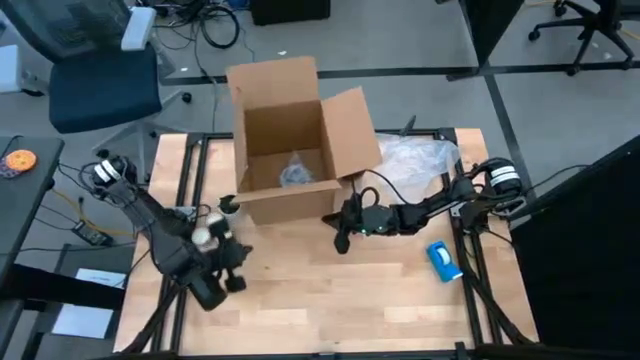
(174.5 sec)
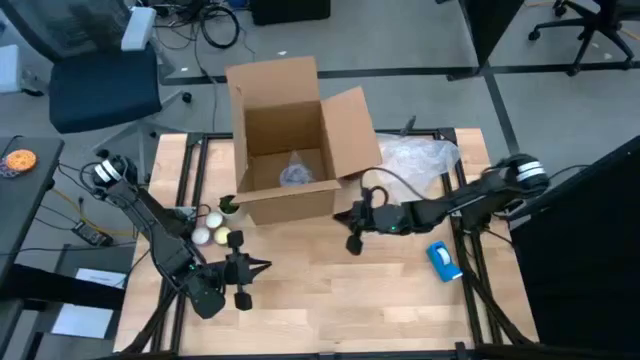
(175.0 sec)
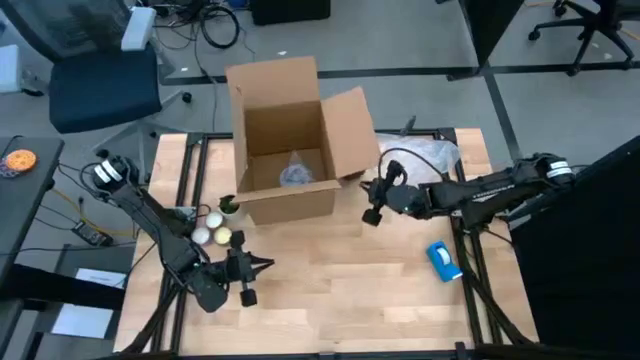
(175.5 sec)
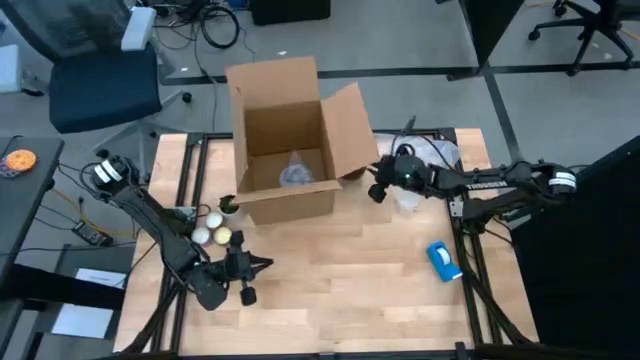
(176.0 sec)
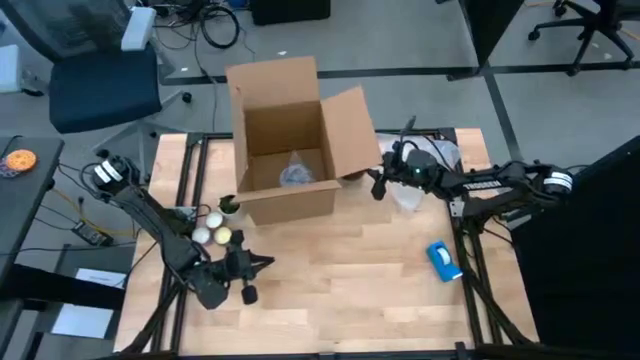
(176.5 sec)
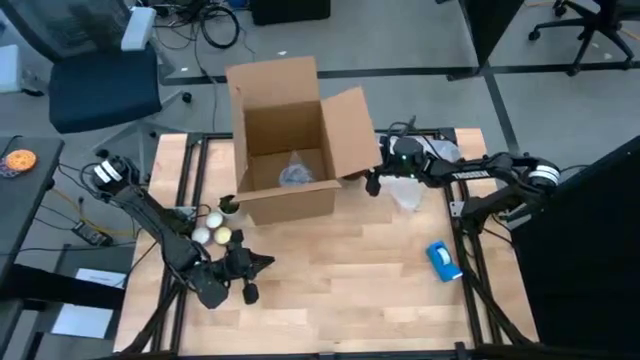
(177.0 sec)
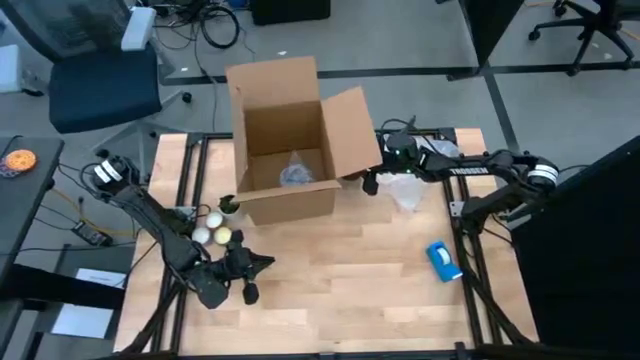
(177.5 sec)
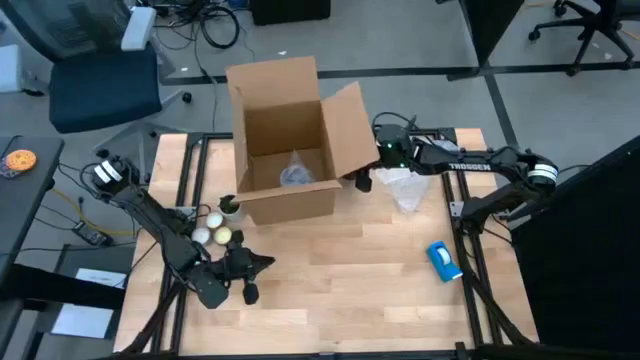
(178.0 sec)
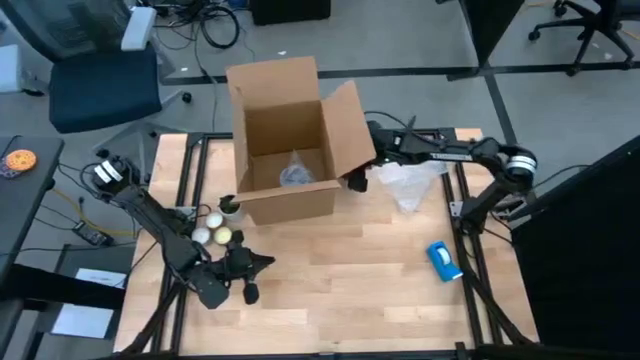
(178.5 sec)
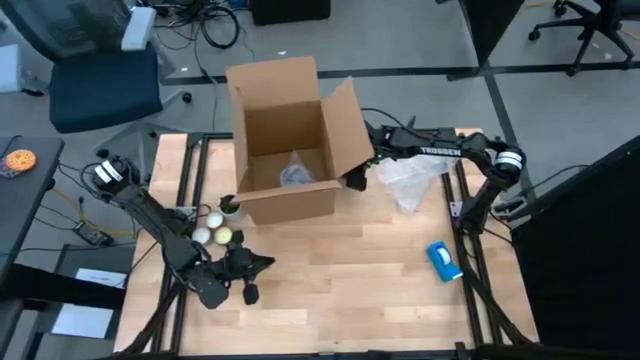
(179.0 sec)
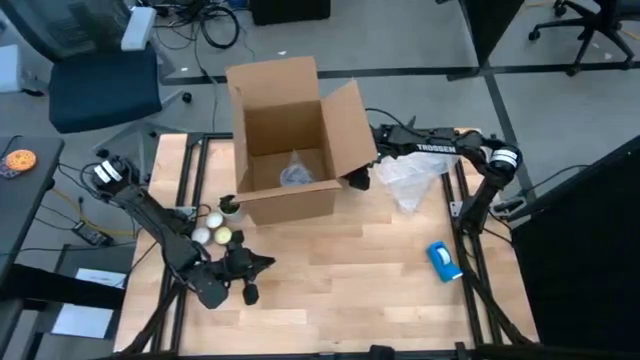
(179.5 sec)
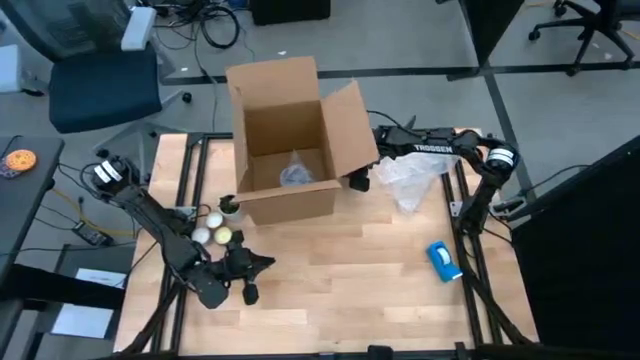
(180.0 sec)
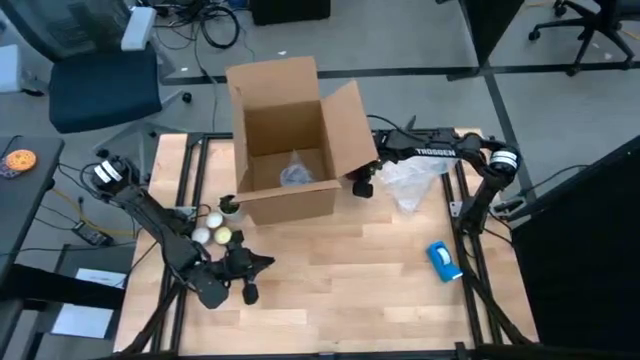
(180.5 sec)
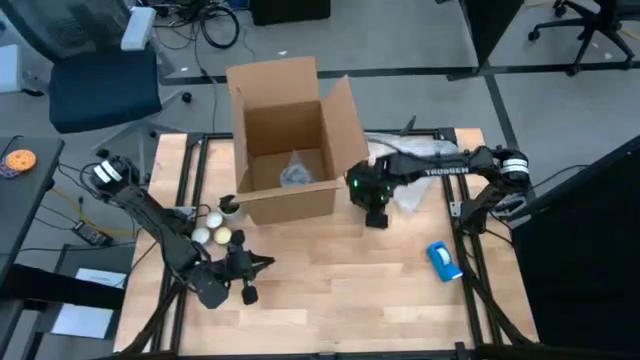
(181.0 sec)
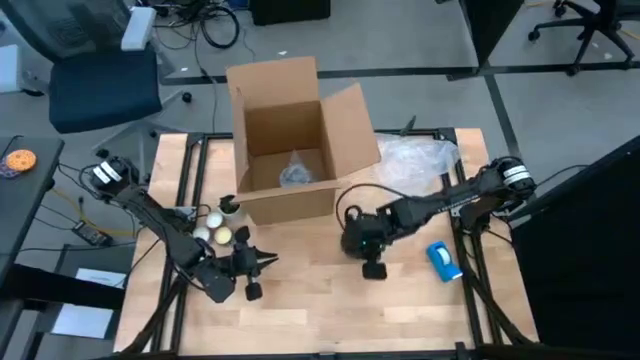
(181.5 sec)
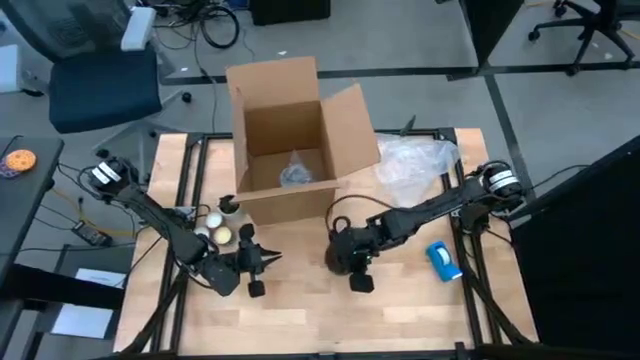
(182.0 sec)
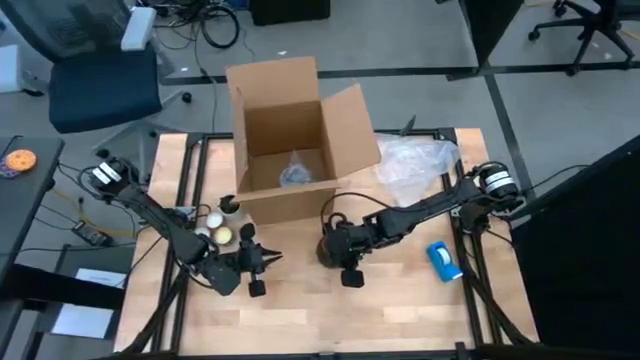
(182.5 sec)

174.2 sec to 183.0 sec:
Task: wrap mug
Move the black mug to the center of the table

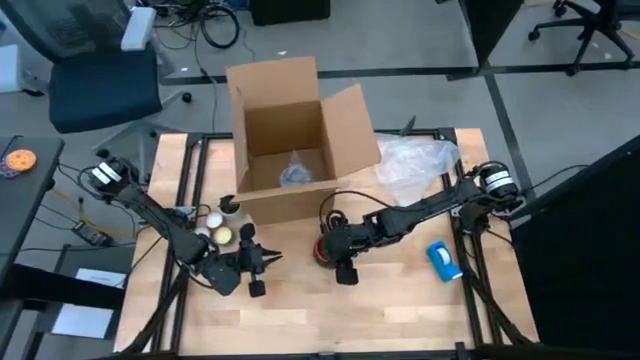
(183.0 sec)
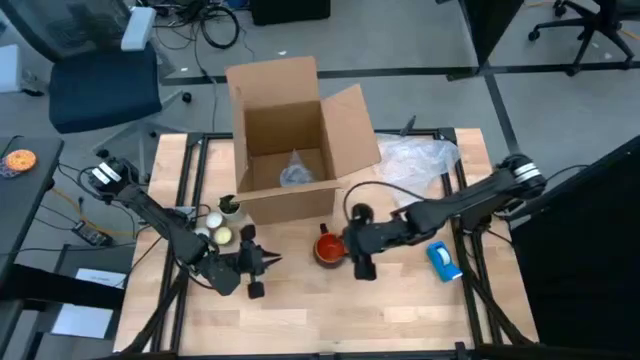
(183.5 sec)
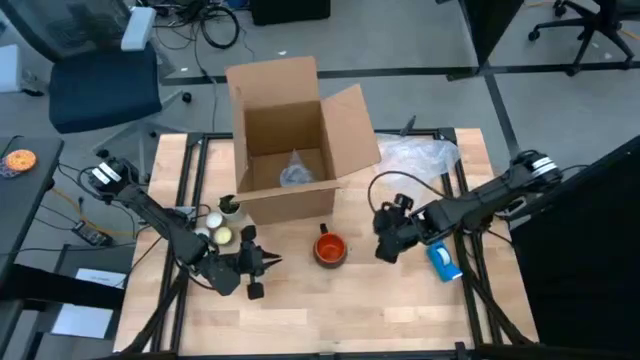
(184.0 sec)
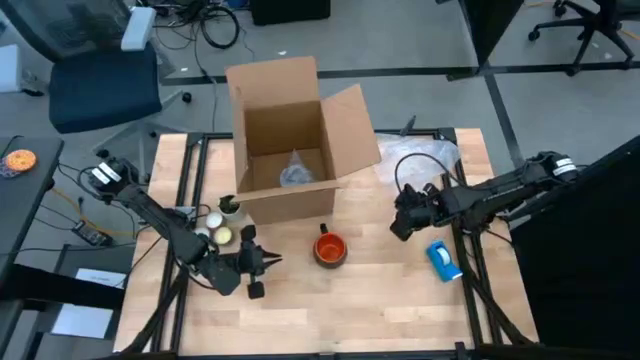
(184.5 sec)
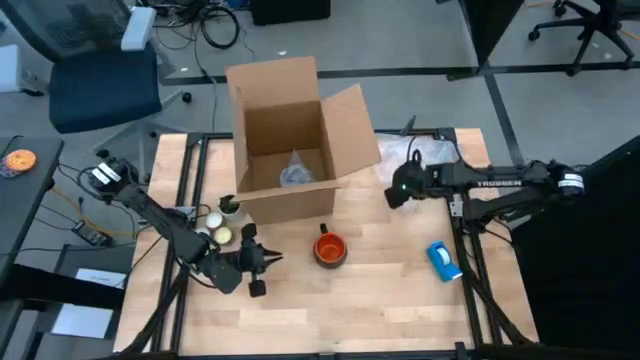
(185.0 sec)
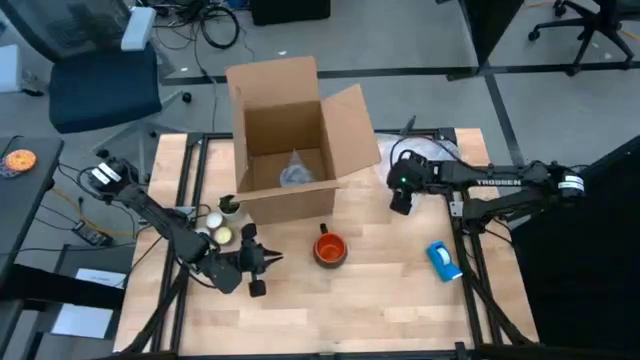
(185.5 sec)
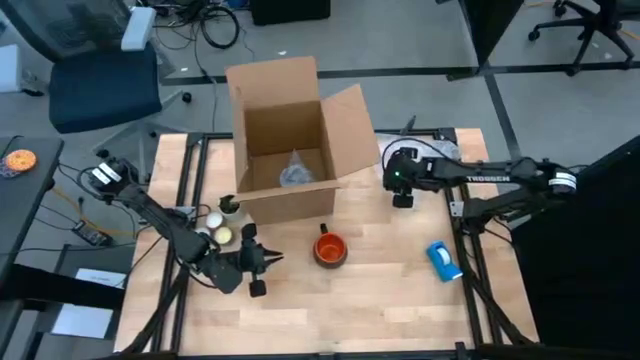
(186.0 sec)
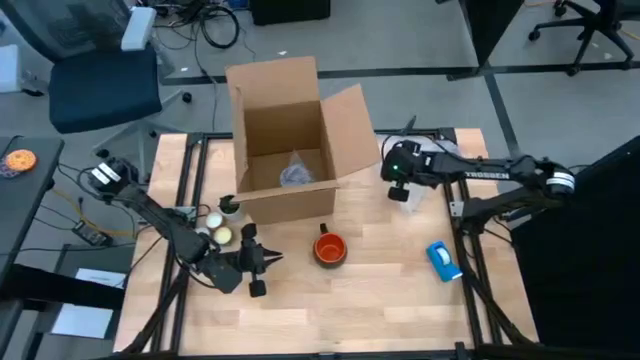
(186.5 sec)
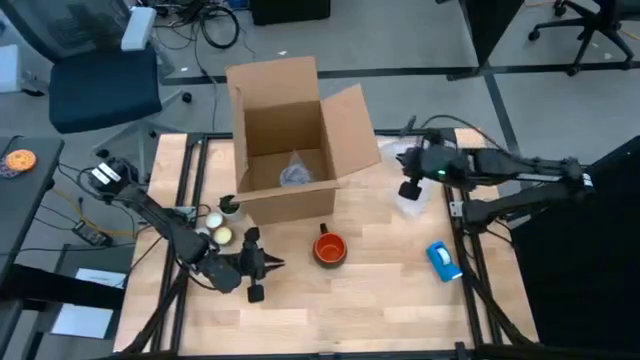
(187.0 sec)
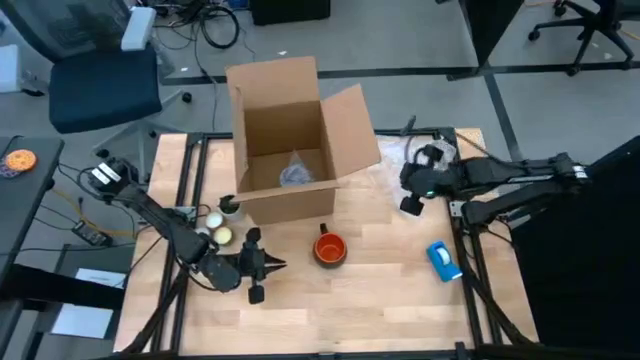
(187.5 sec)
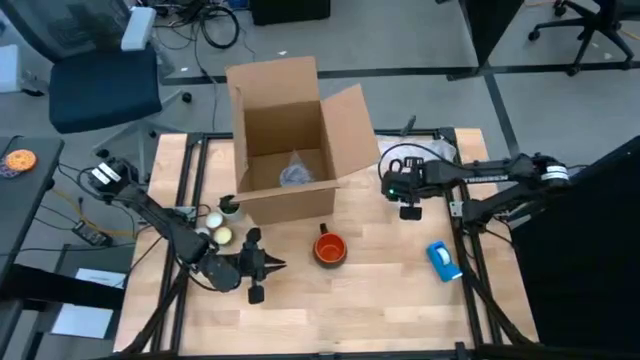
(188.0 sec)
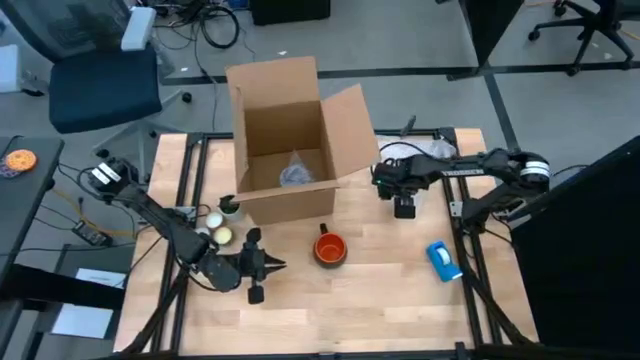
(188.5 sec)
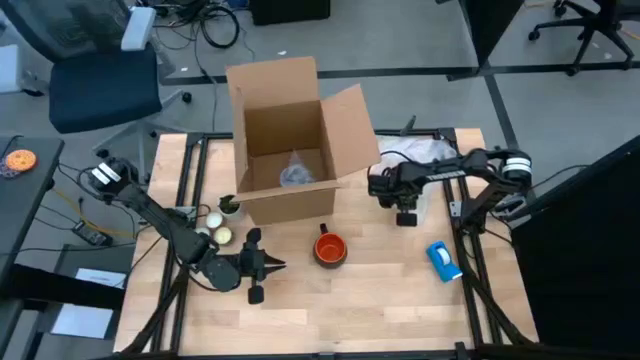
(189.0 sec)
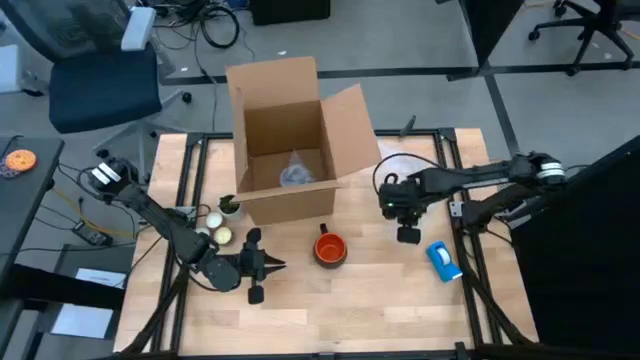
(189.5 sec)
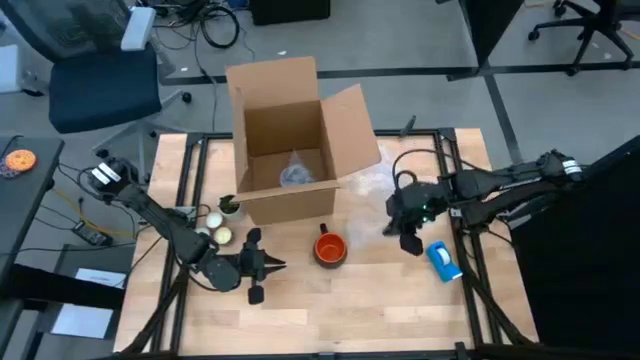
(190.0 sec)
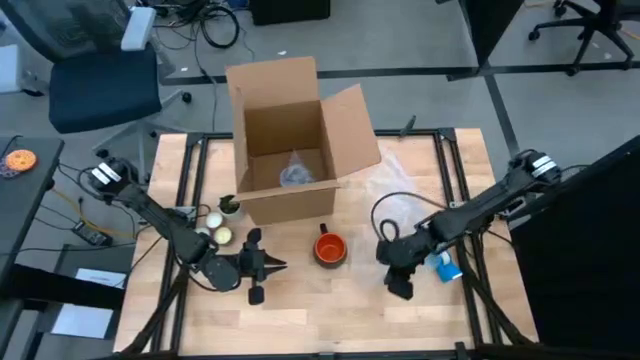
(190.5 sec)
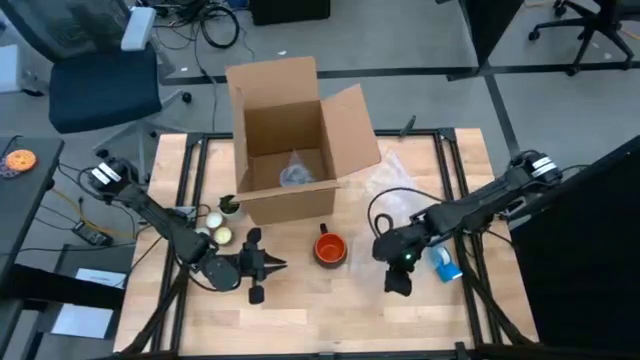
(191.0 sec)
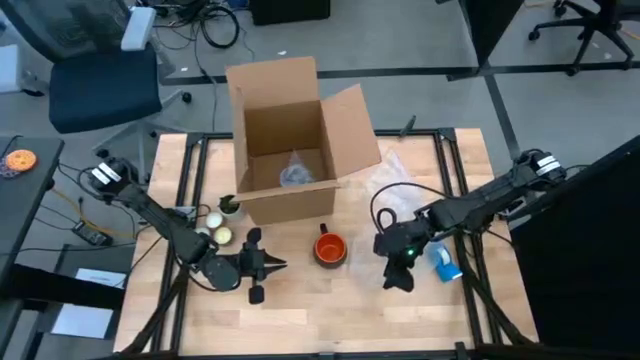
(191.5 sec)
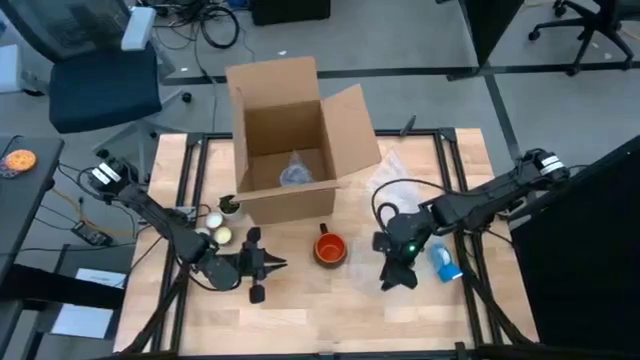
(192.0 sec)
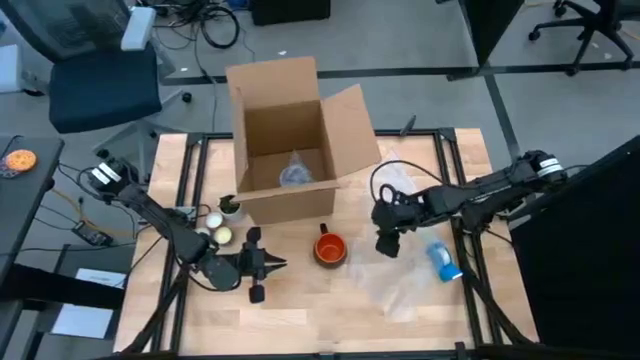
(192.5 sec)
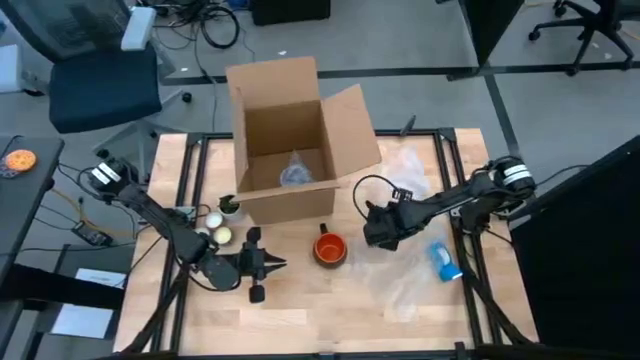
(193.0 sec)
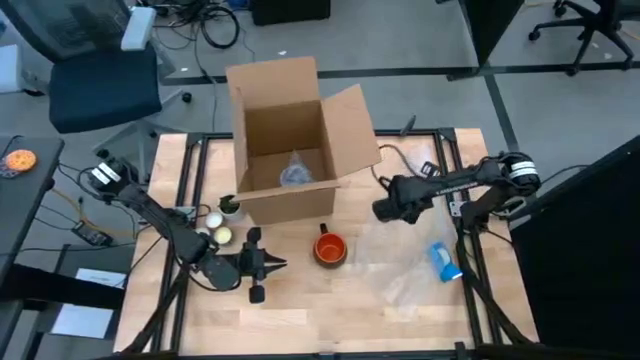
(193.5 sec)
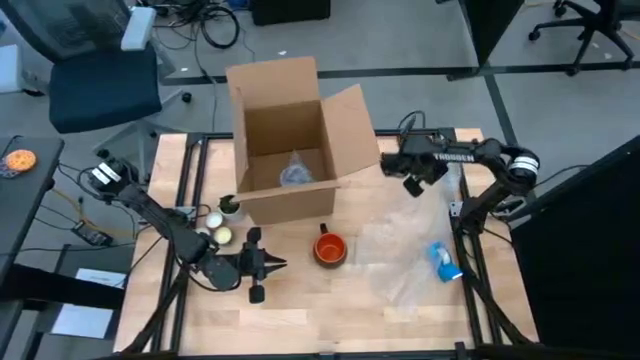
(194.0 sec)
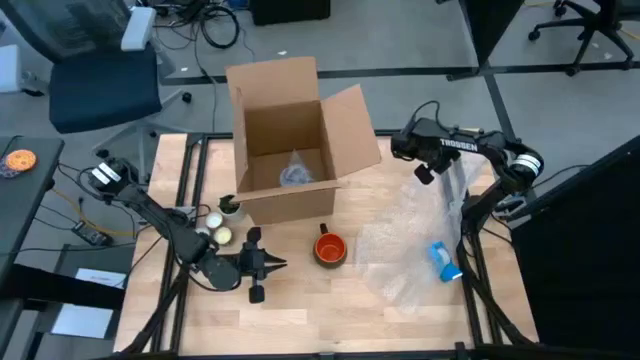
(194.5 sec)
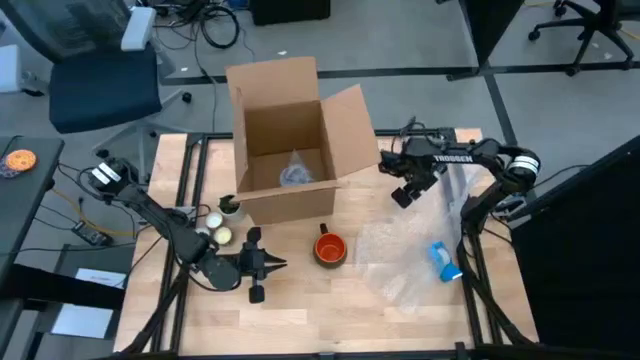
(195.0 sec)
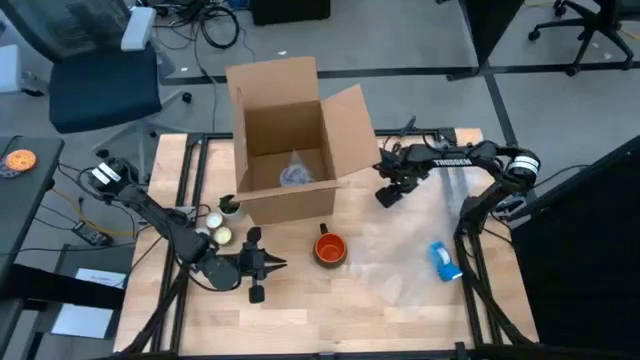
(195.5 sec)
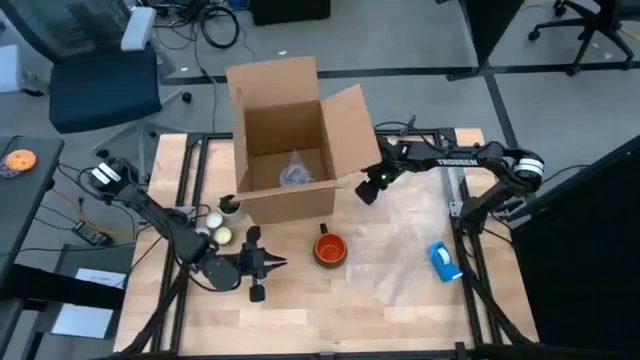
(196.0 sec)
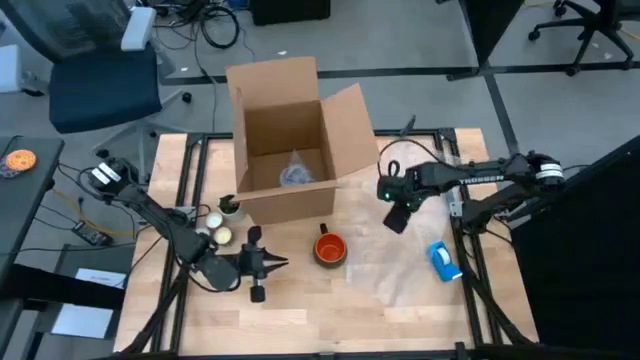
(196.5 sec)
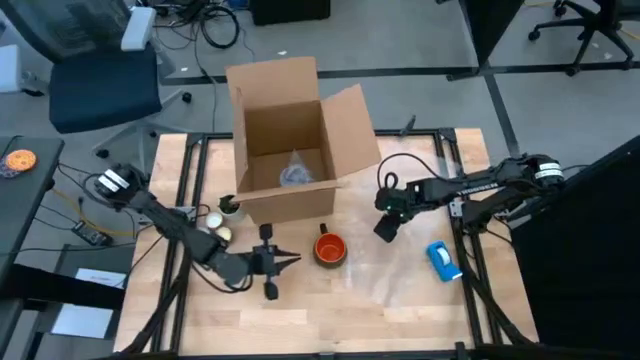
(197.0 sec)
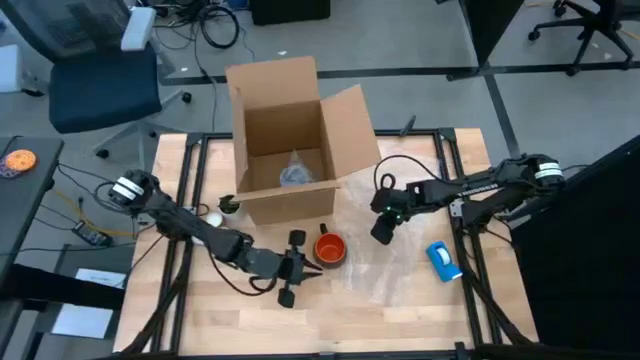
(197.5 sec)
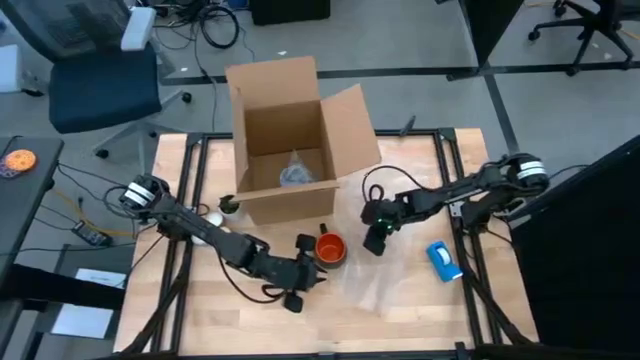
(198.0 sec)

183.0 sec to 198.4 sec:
Prepare the bubble wrap
